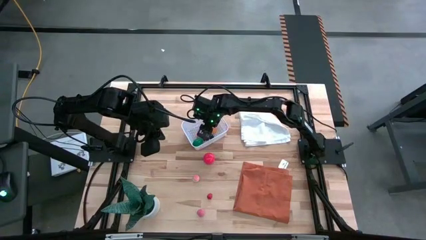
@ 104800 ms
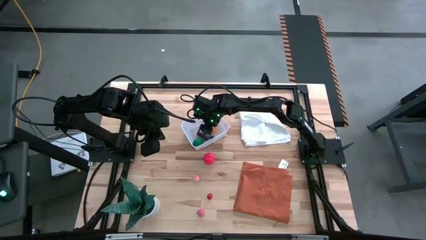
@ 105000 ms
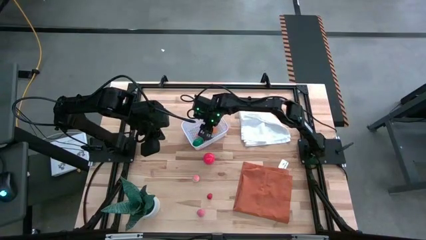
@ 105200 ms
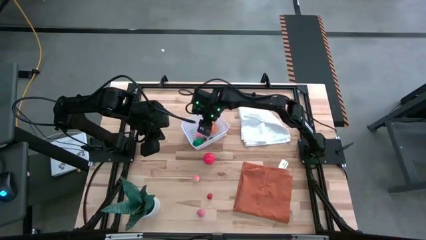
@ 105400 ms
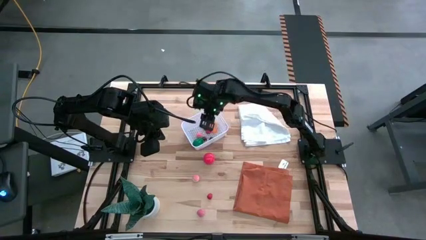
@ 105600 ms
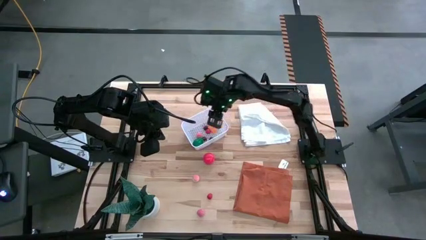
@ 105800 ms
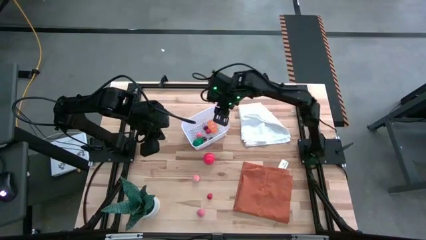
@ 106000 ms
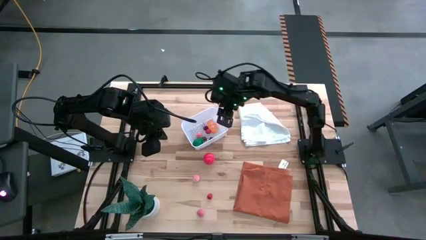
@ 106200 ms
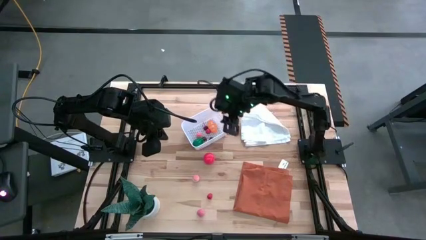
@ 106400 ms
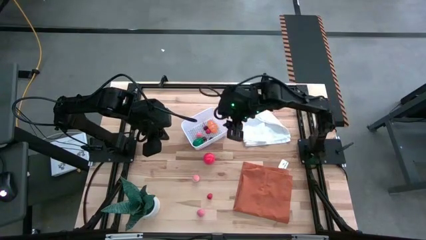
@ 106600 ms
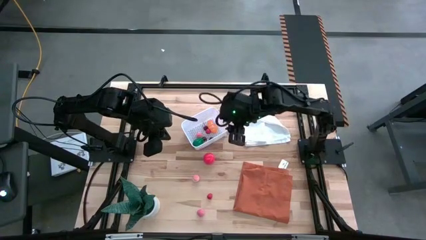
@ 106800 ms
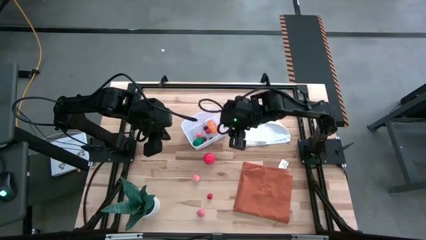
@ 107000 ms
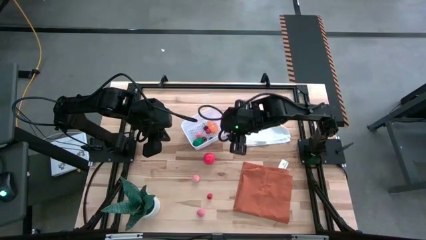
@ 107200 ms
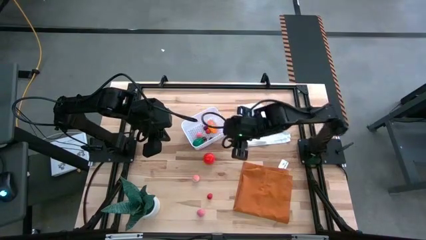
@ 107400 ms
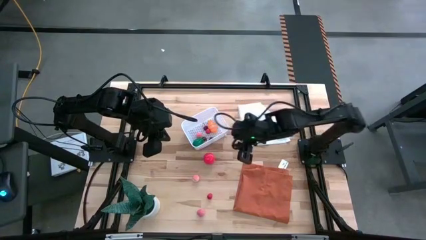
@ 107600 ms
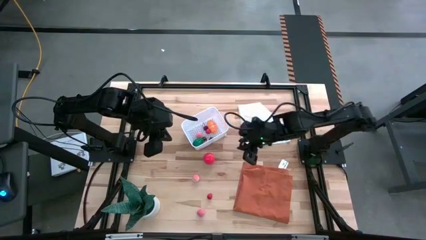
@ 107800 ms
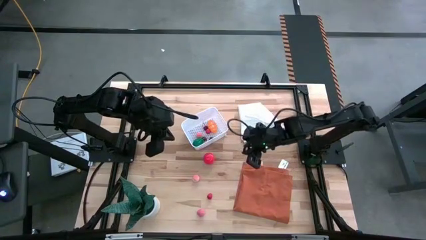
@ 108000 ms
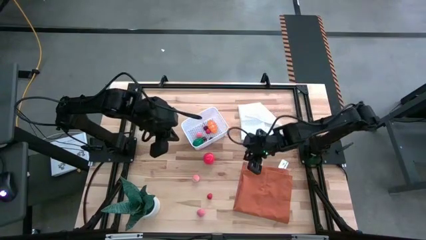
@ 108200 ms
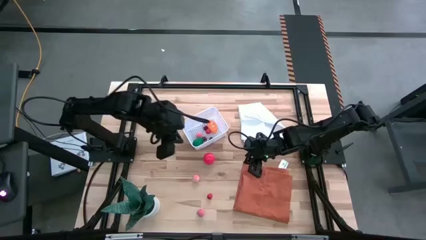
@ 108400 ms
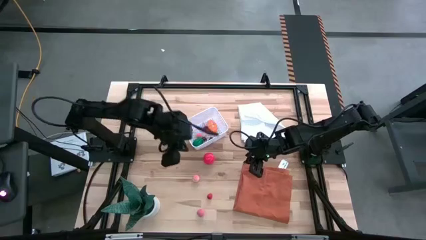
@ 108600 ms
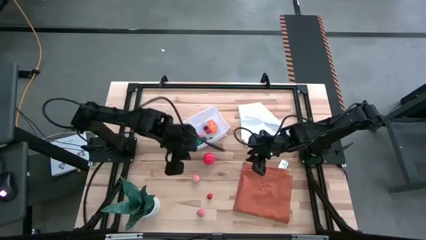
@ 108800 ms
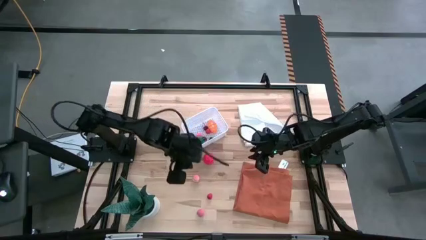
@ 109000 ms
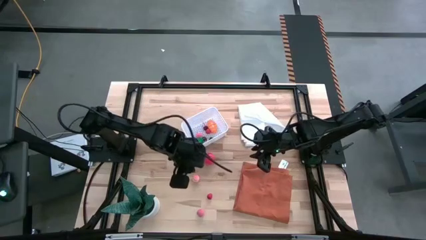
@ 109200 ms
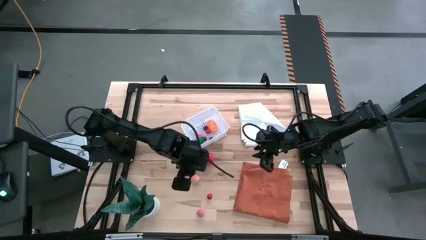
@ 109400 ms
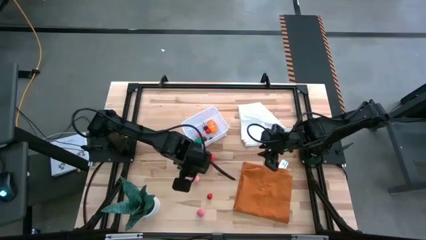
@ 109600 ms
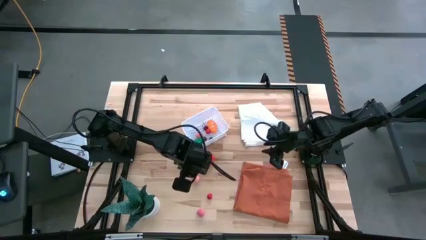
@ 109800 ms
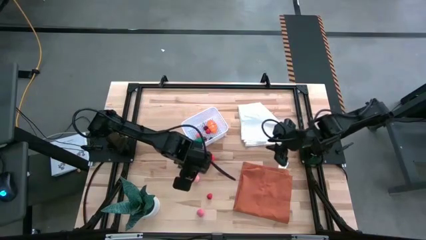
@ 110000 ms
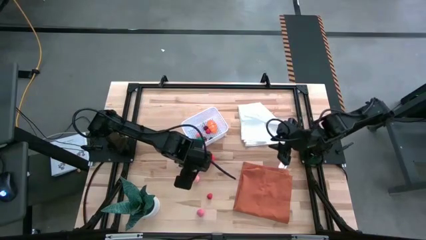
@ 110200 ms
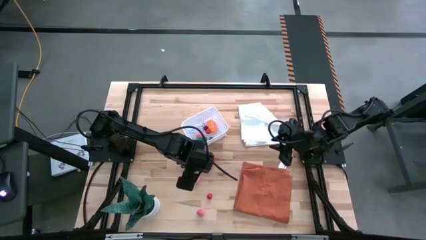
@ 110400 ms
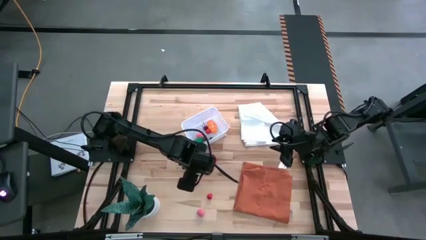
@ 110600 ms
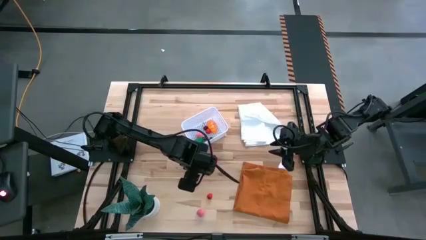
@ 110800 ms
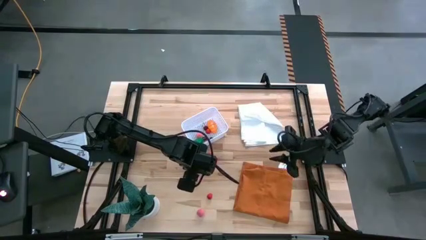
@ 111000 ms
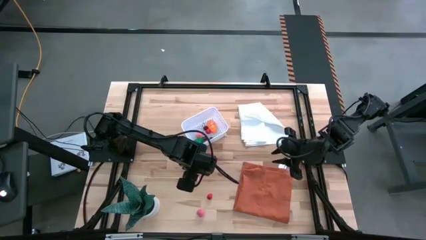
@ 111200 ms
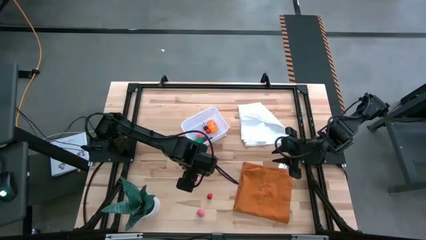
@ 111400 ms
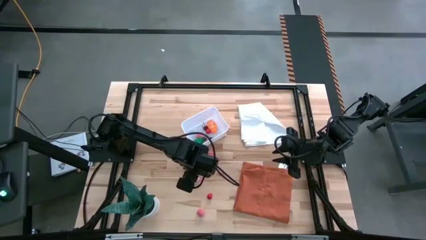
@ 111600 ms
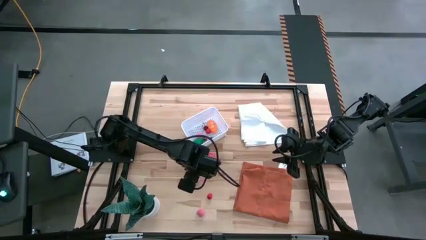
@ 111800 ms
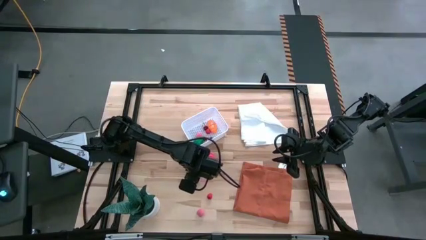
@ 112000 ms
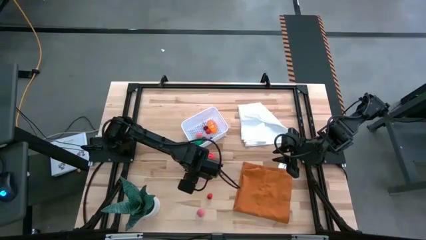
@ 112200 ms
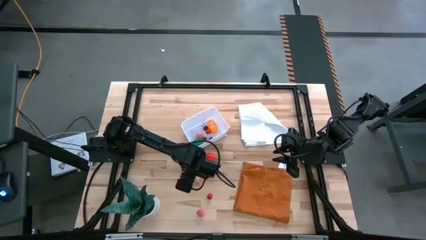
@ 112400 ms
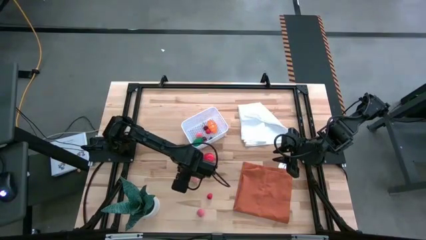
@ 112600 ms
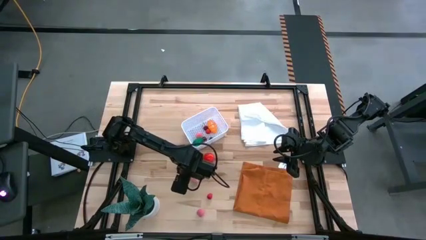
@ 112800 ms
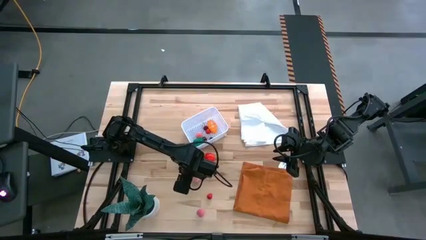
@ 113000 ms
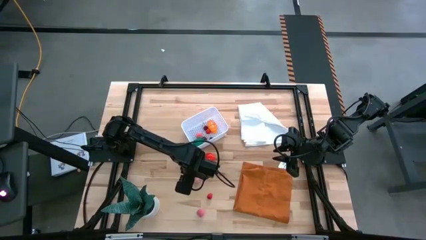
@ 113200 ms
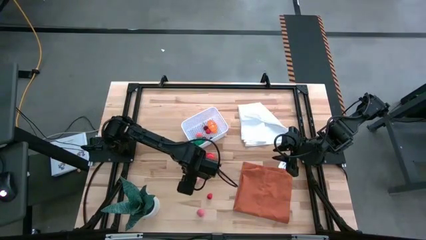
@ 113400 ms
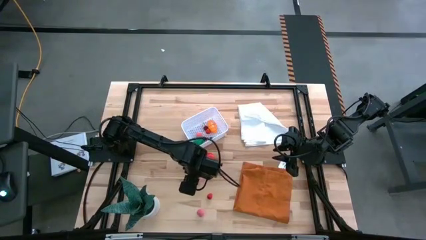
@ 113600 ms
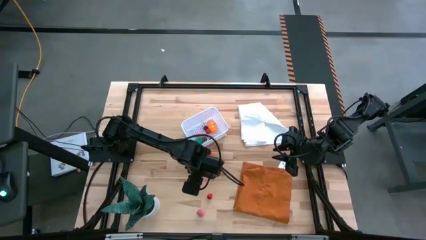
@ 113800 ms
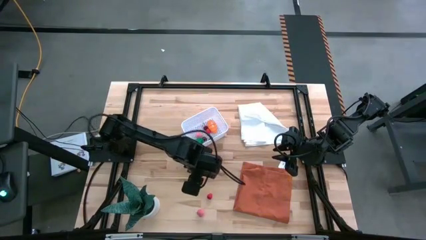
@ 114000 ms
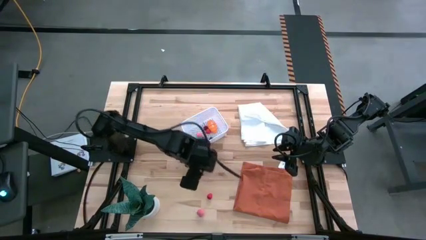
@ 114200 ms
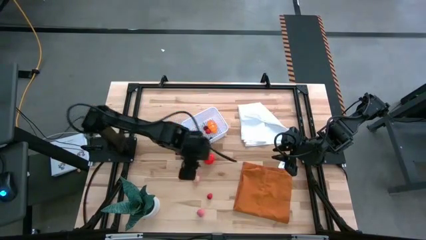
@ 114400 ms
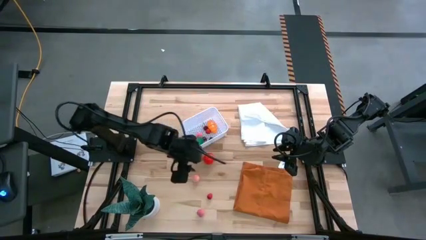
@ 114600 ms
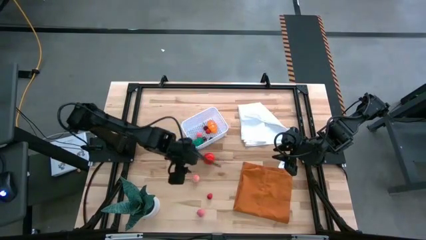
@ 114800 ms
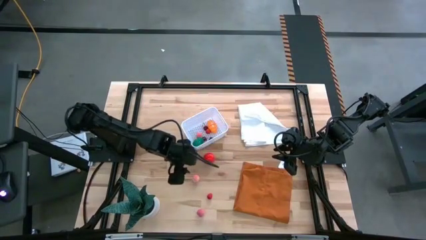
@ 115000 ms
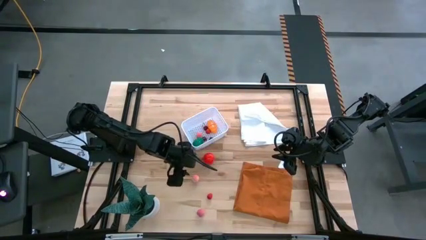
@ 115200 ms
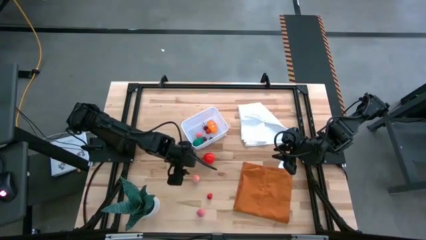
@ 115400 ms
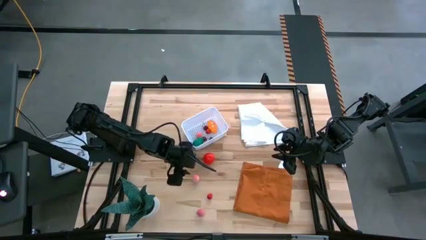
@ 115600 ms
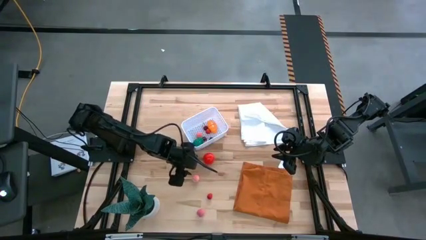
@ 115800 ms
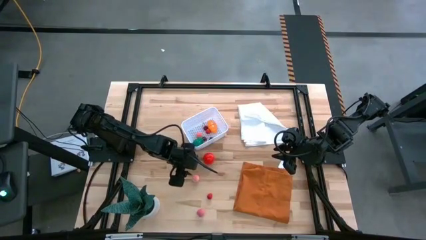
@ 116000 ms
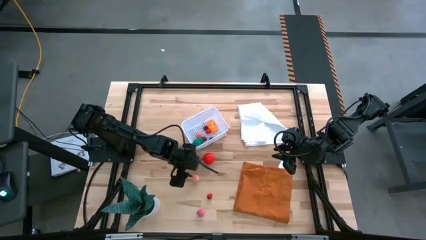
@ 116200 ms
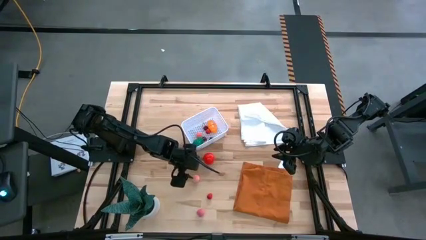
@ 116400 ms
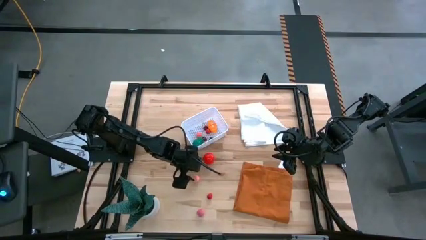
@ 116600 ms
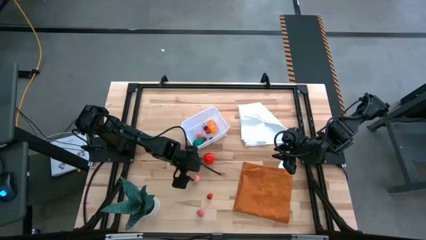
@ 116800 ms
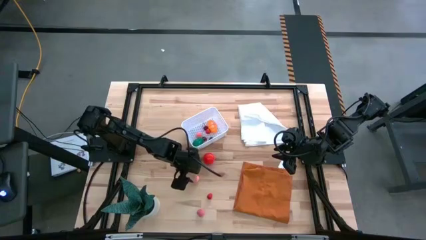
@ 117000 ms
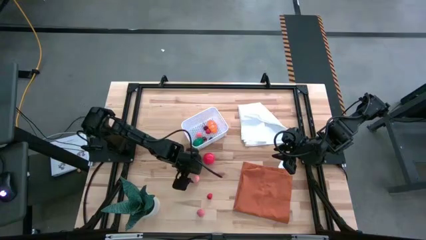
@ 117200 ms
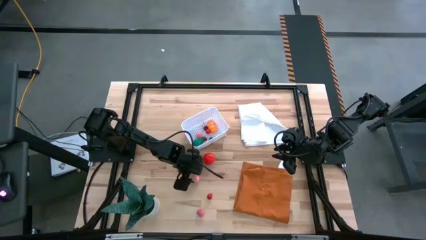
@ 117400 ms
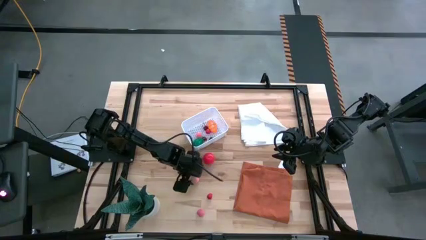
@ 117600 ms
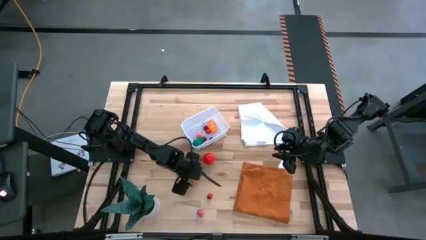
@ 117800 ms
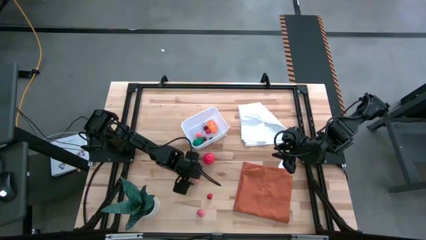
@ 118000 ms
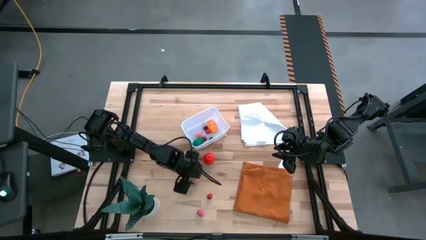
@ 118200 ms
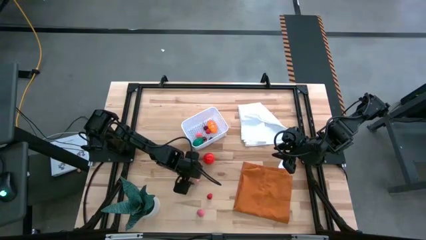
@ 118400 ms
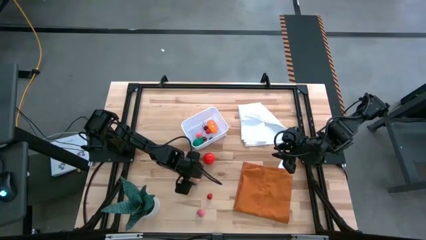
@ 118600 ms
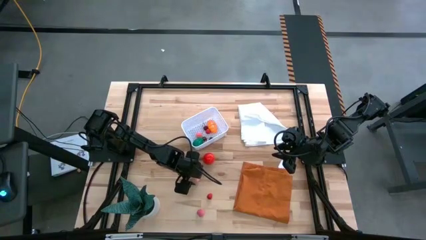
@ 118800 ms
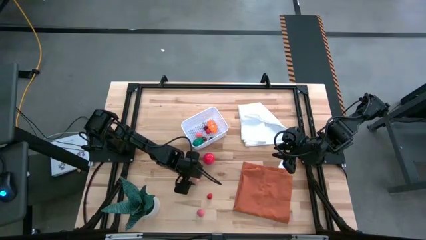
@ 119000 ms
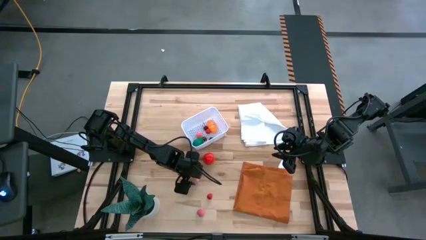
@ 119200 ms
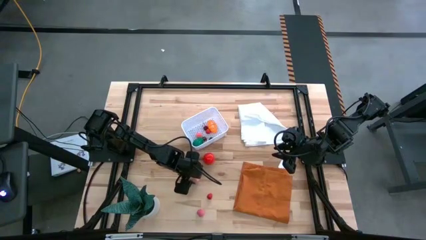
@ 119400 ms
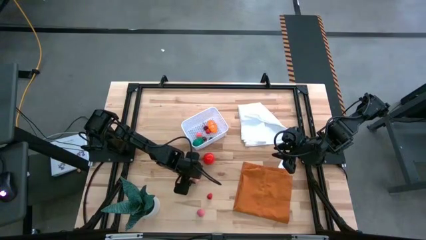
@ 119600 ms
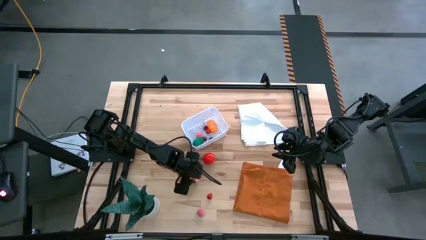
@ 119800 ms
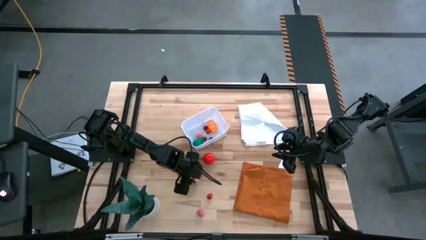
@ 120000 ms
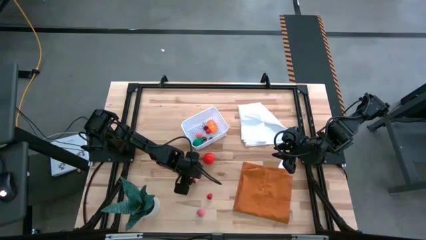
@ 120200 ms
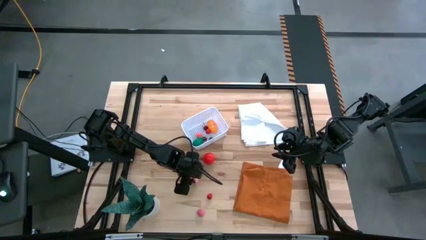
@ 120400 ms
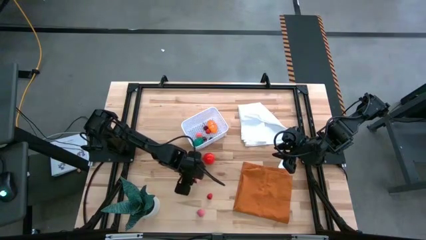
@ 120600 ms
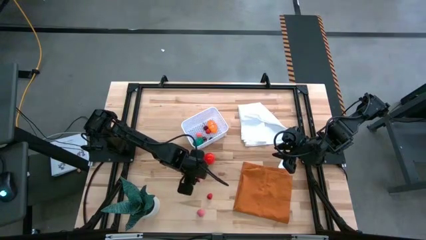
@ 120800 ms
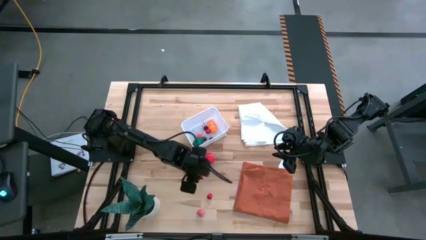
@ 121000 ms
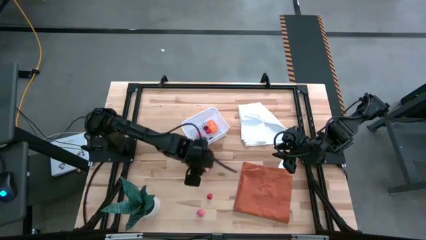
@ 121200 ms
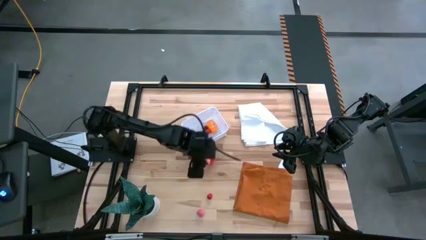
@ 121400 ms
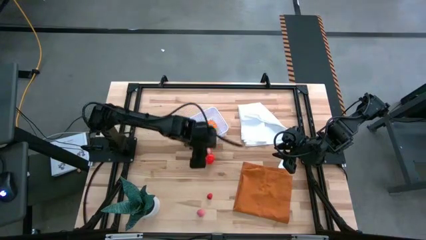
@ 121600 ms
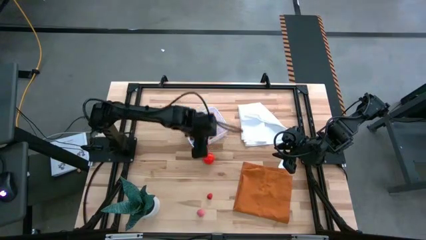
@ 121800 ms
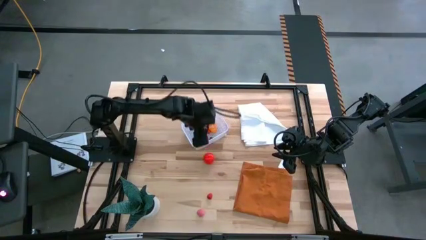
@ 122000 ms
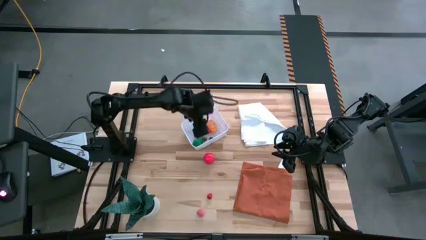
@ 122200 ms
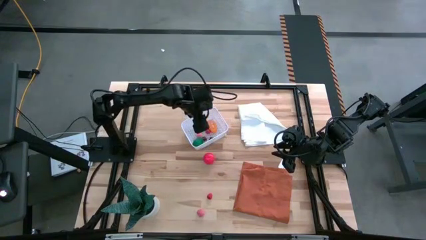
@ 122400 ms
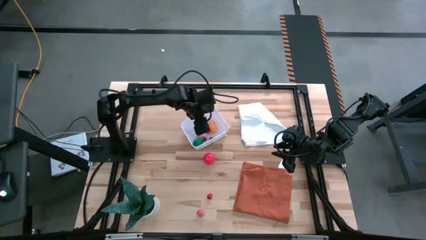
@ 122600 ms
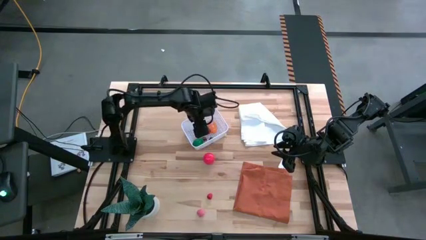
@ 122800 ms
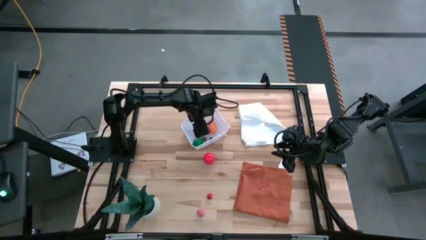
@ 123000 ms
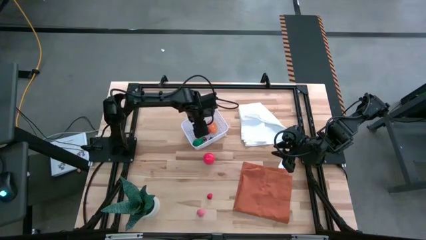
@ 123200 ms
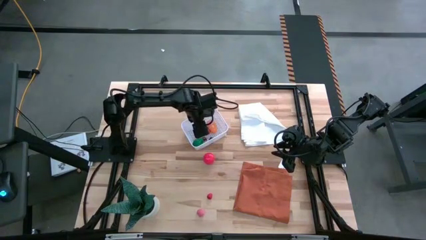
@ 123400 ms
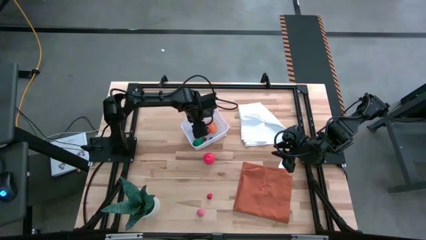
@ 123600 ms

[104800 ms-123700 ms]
Task: Pick and placing Produce into tupperware
Put the top apricot in the basket
